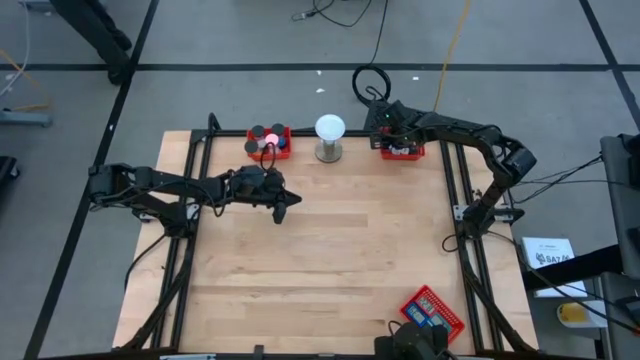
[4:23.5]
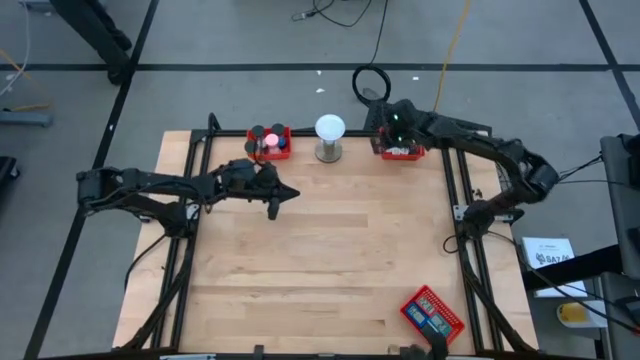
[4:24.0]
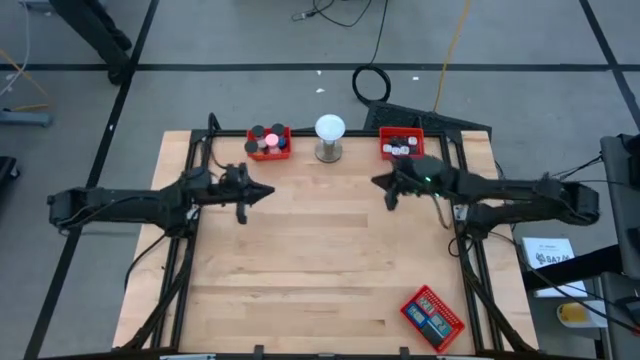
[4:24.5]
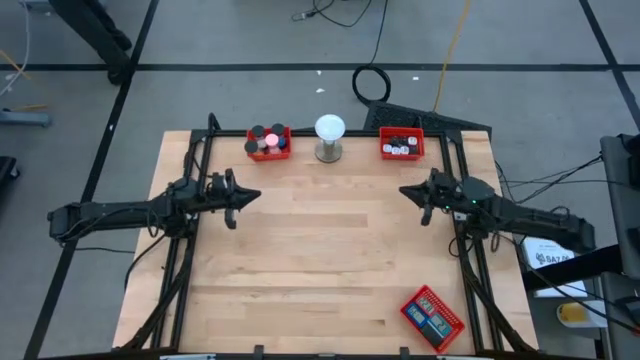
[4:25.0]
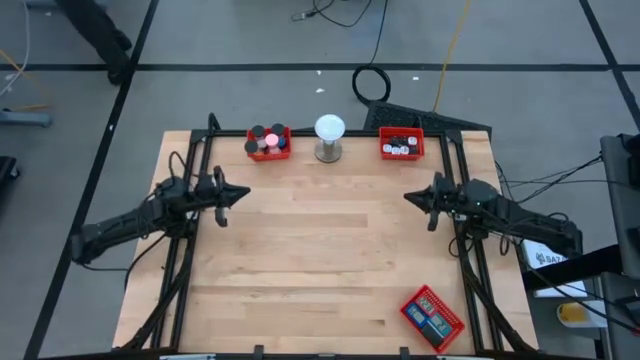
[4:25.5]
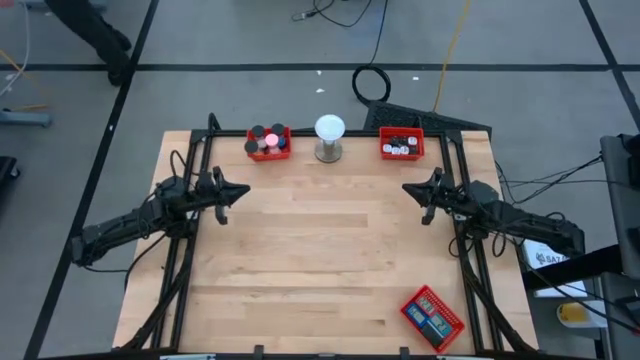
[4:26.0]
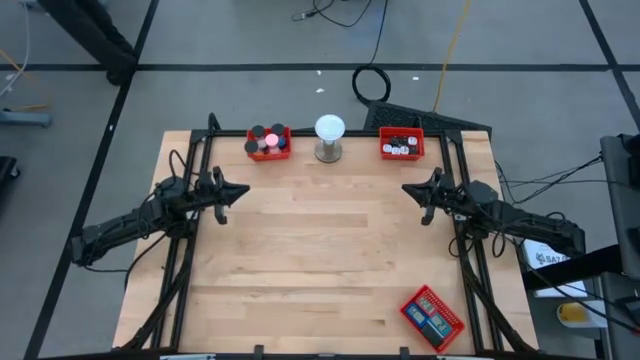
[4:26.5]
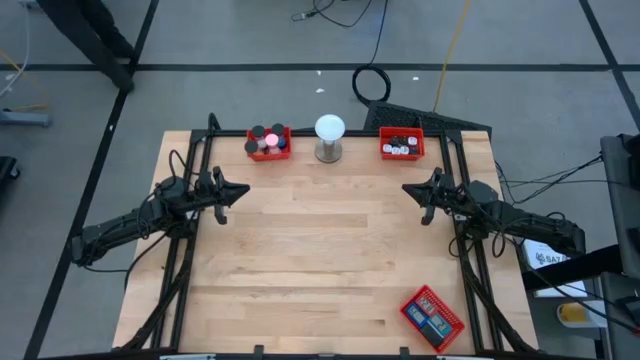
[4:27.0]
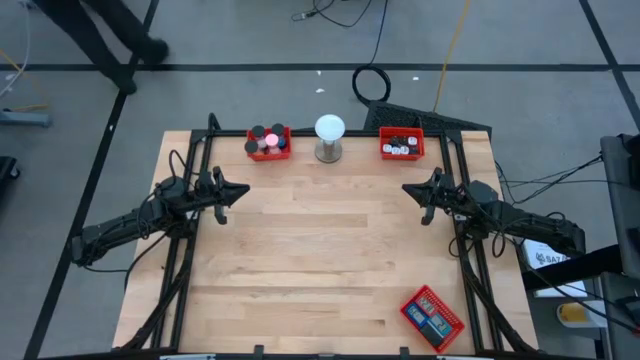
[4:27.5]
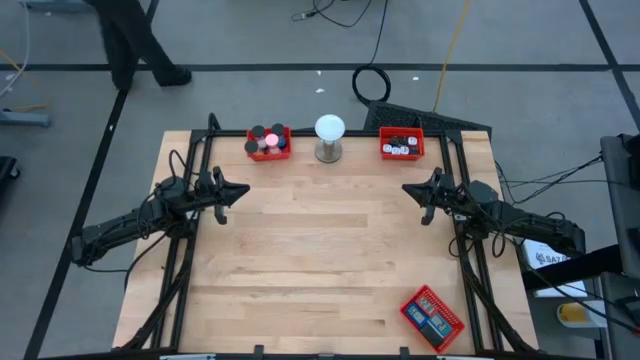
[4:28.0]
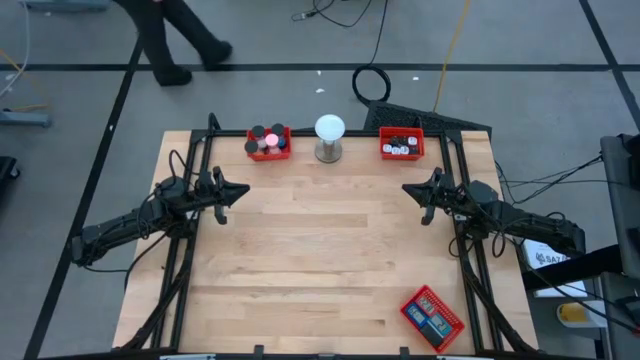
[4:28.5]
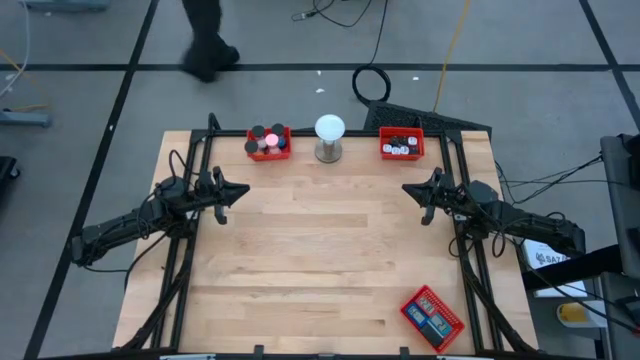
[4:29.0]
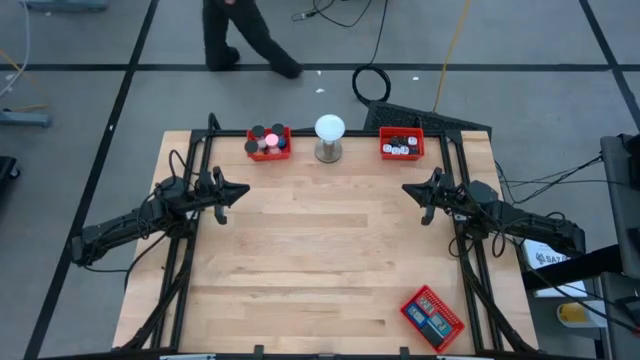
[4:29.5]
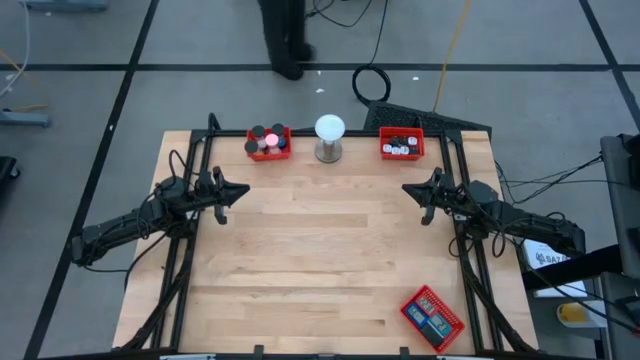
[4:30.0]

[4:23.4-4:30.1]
Task: Pick & Place Office items
Return to Home Position

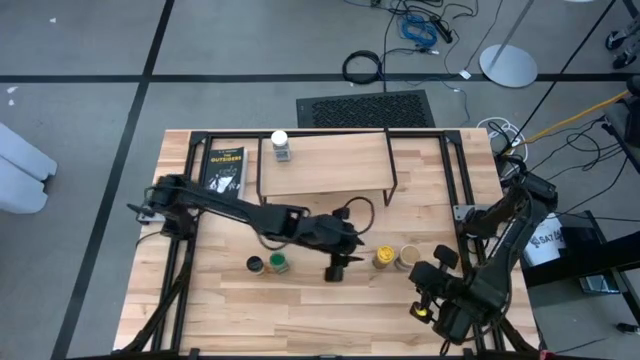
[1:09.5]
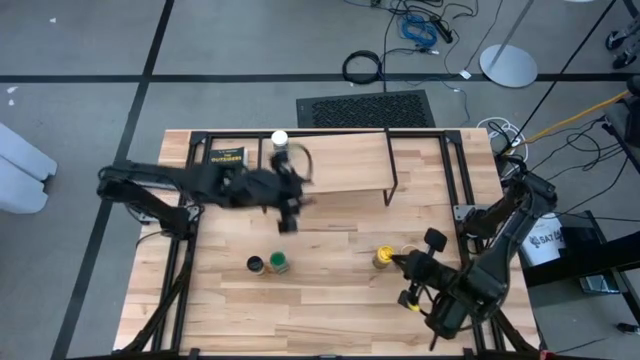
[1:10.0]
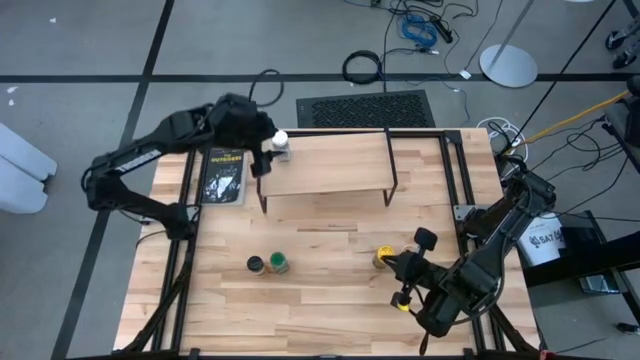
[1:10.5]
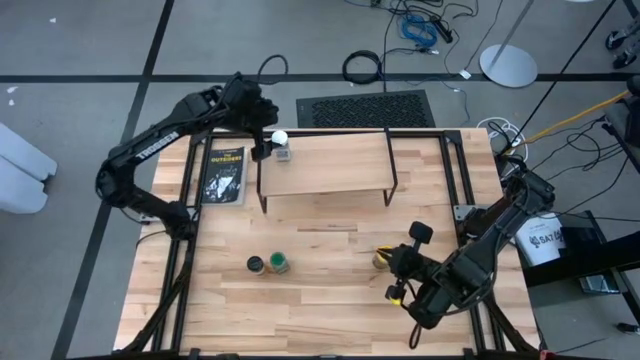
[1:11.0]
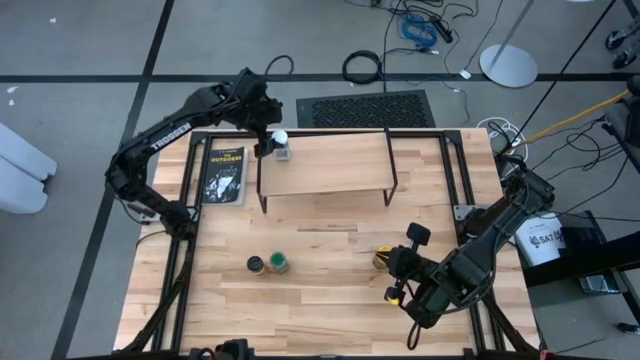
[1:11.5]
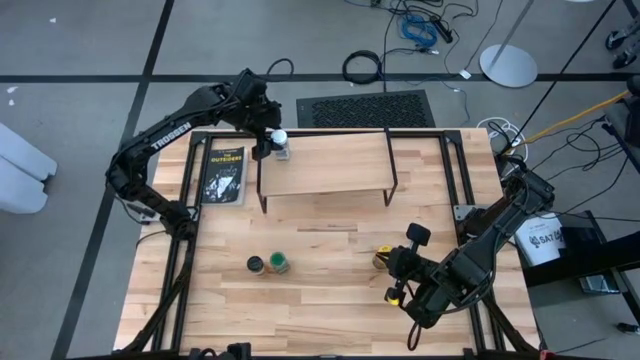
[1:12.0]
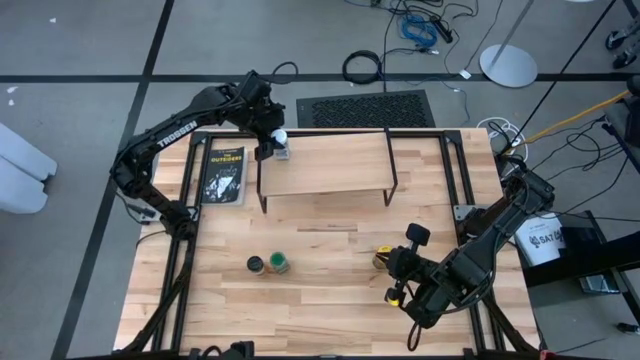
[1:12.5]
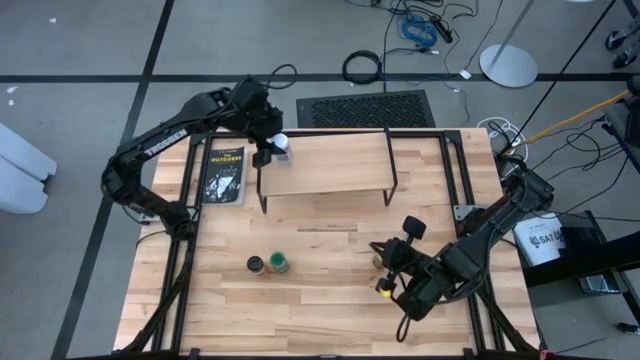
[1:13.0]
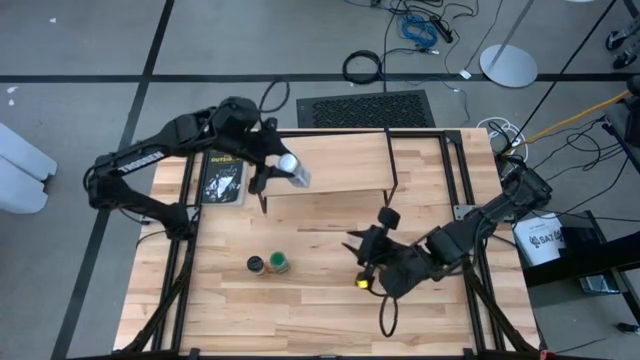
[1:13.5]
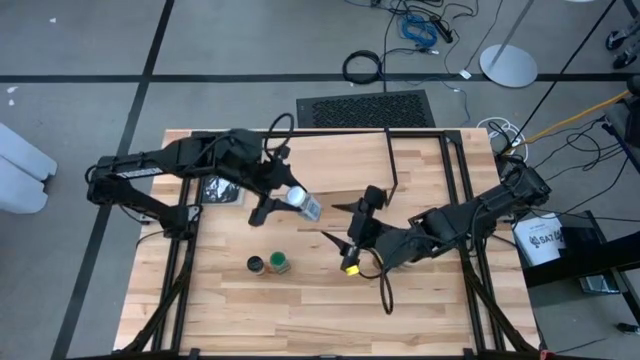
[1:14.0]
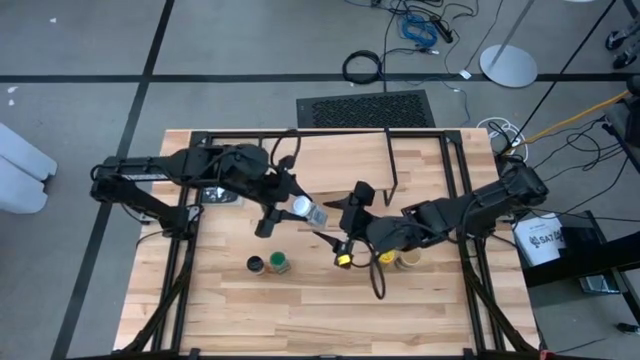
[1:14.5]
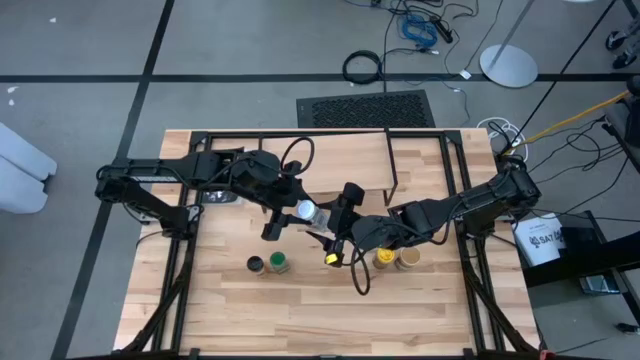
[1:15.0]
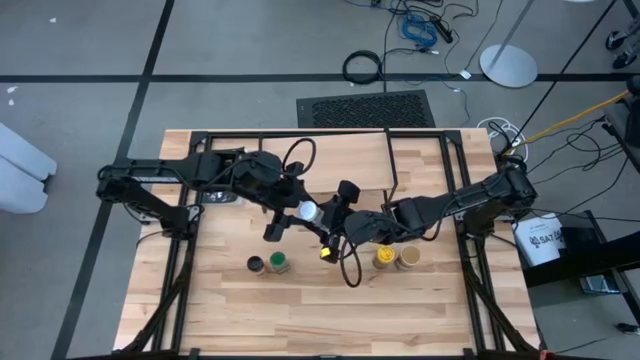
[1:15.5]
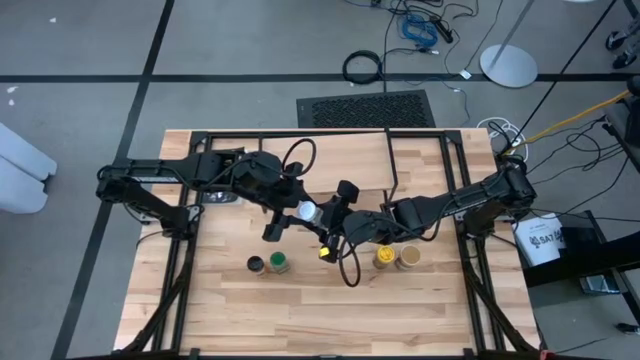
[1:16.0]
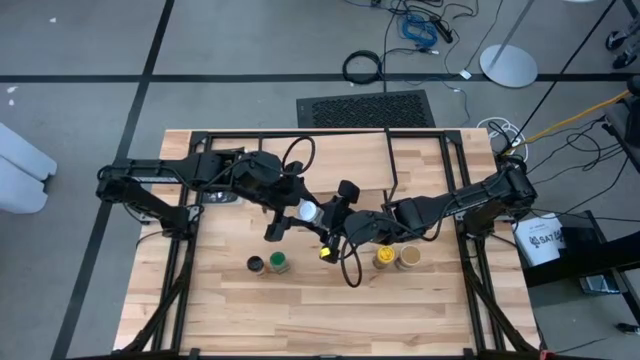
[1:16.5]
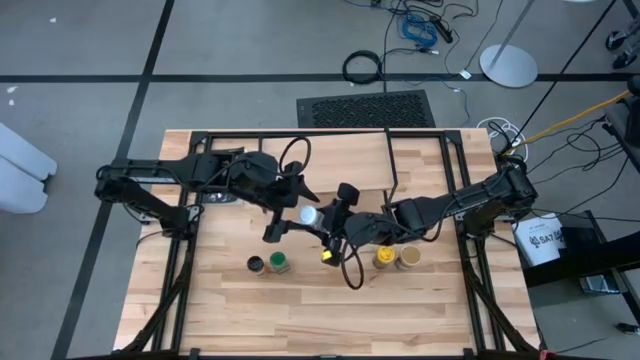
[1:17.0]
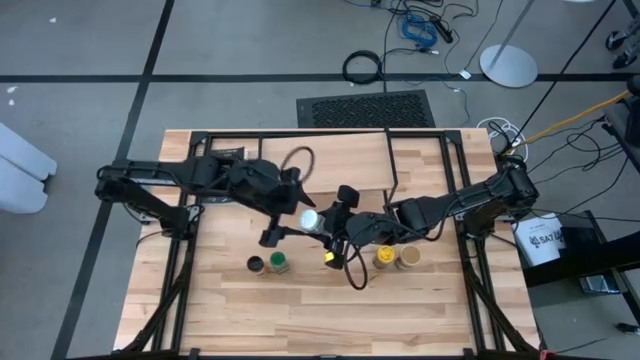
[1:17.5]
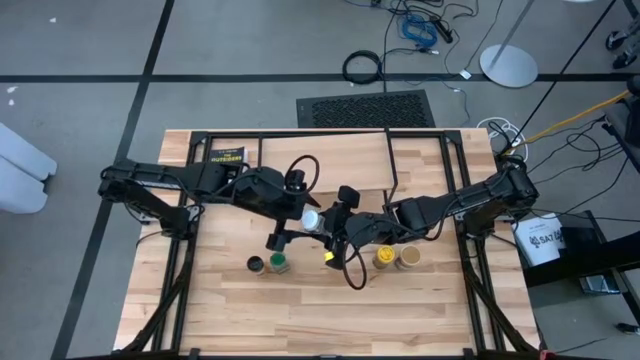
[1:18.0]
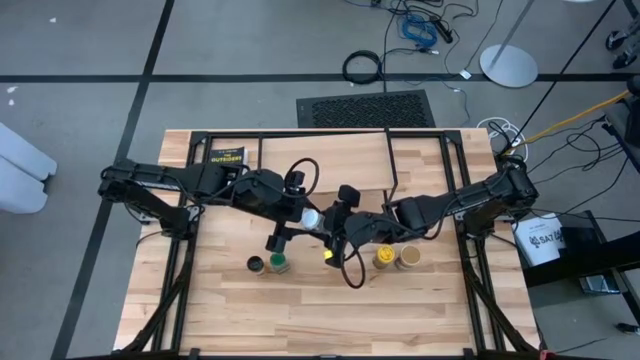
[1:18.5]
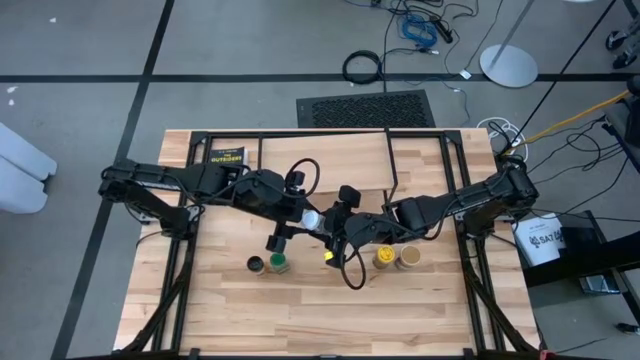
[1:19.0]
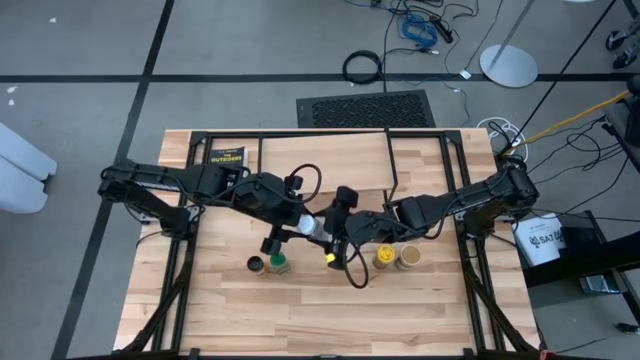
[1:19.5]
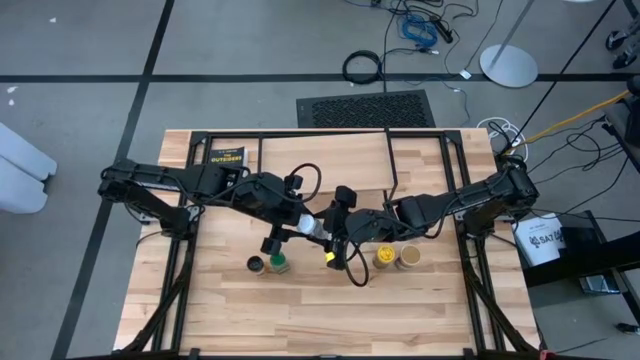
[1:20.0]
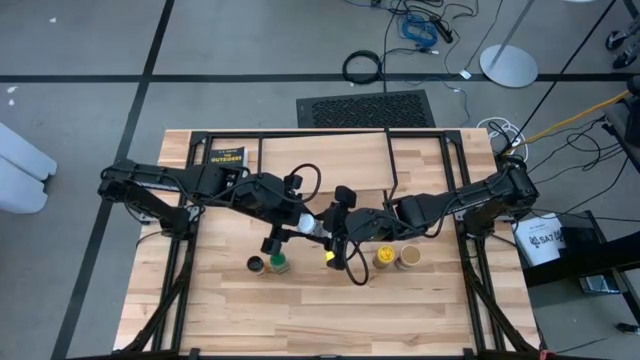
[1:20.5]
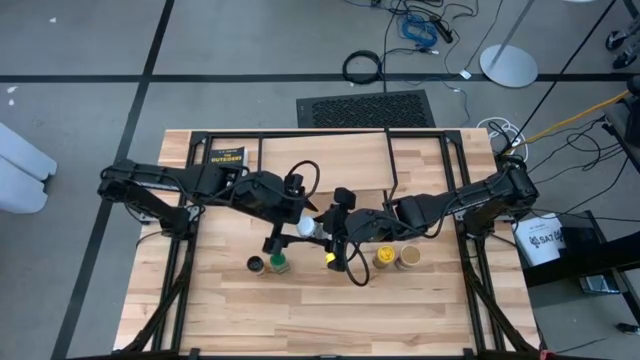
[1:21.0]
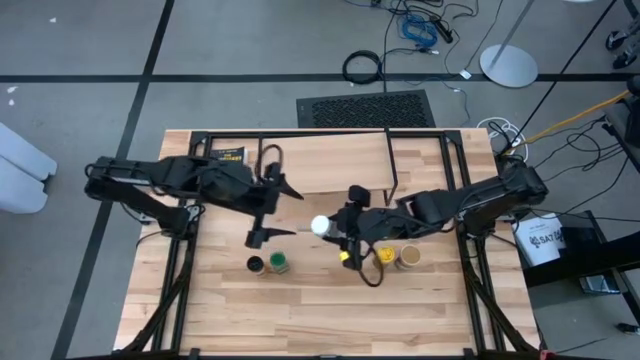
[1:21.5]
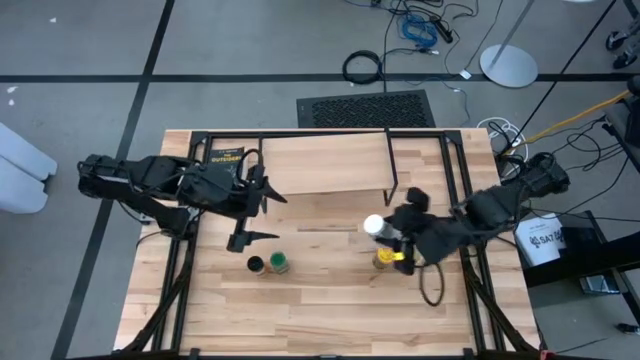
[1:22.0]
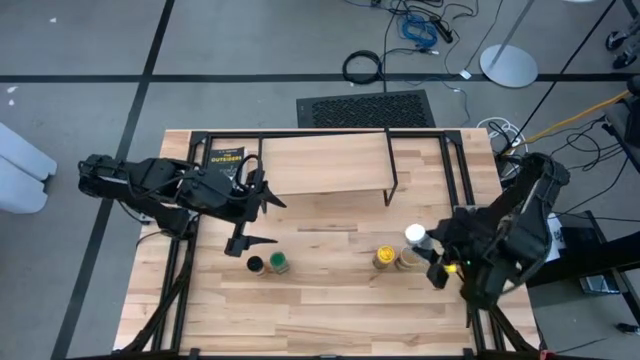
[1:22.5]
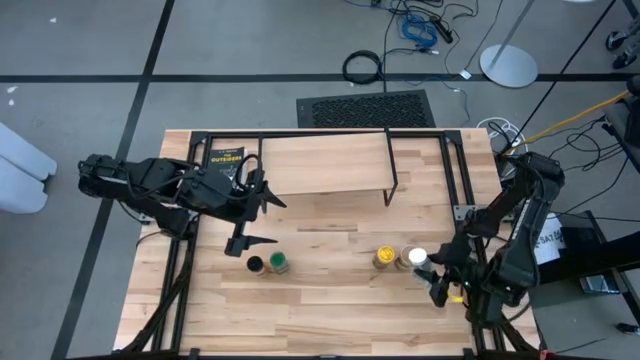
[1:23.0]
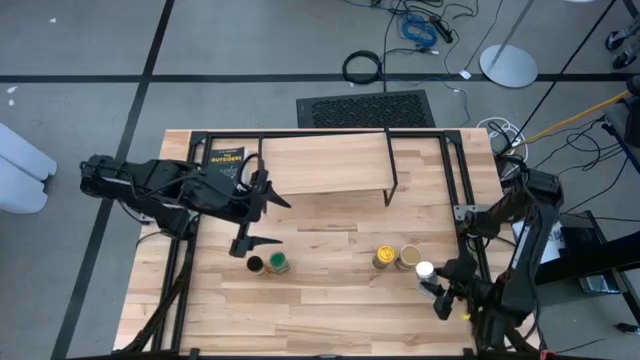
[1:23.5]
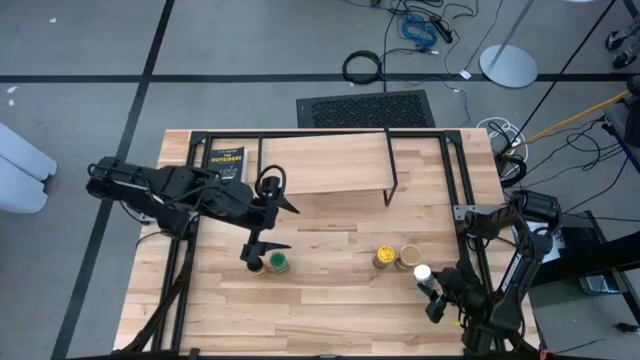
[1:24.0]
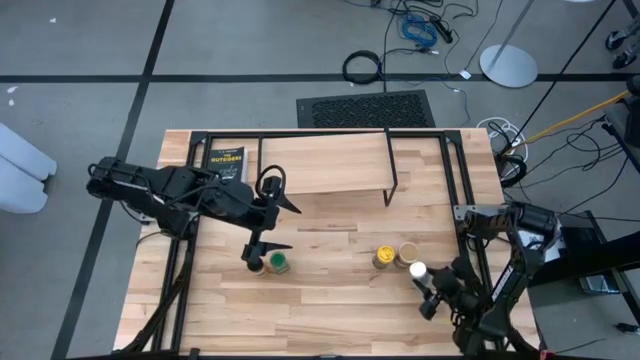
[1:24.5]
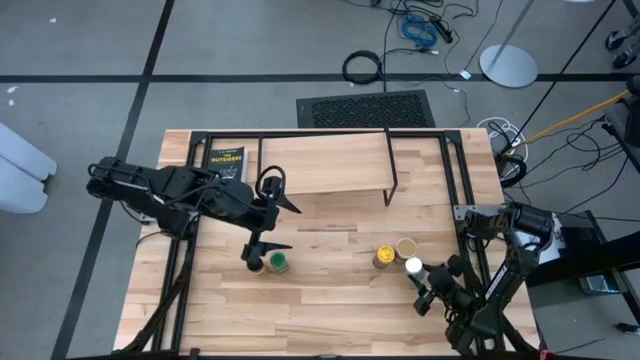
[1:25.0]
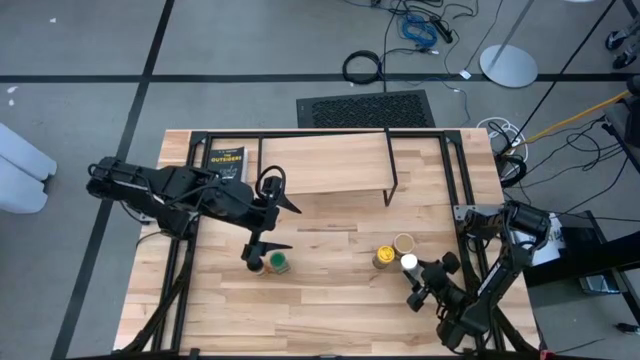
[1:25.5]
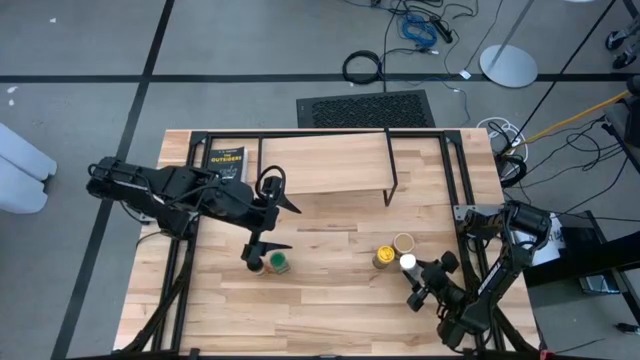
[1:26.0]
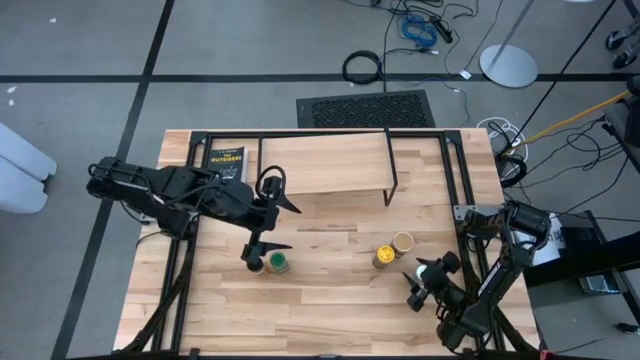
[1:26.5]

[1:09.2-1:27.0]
Task: Shelf spices
Remove the white seasoning bottle from the shelf
